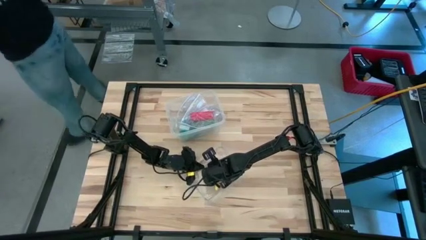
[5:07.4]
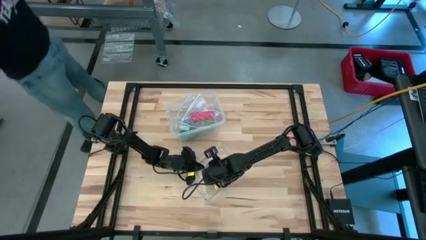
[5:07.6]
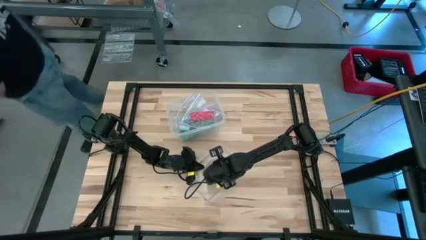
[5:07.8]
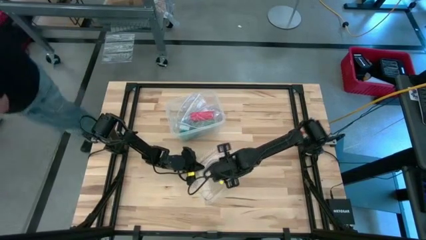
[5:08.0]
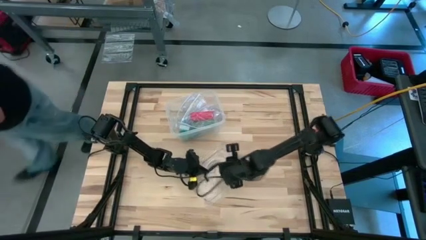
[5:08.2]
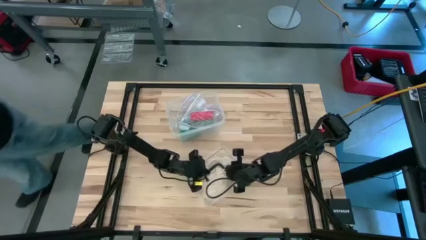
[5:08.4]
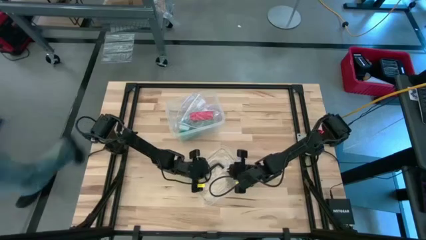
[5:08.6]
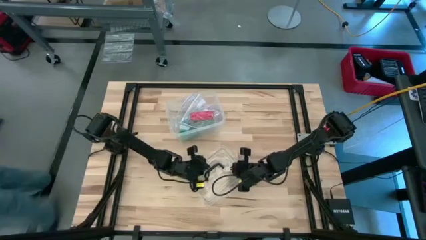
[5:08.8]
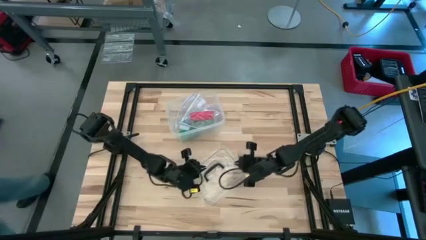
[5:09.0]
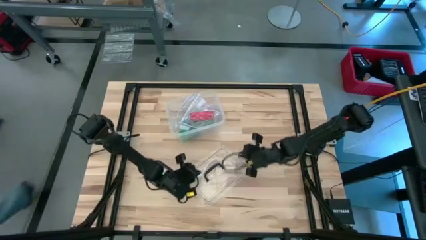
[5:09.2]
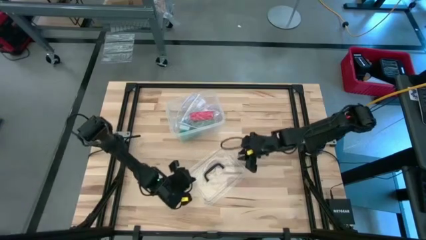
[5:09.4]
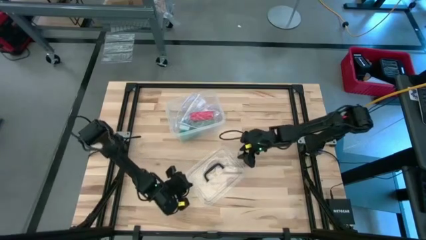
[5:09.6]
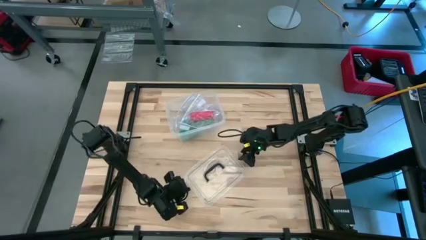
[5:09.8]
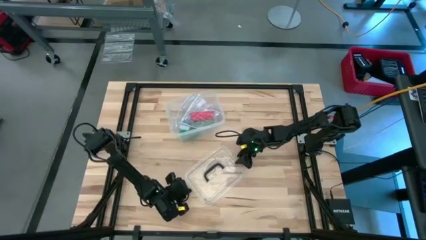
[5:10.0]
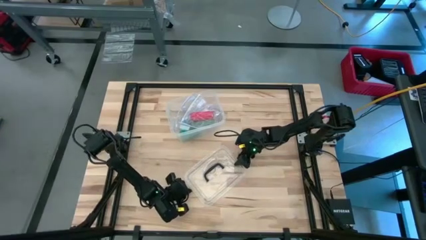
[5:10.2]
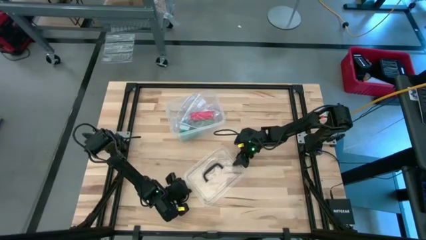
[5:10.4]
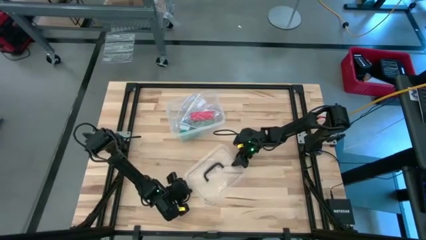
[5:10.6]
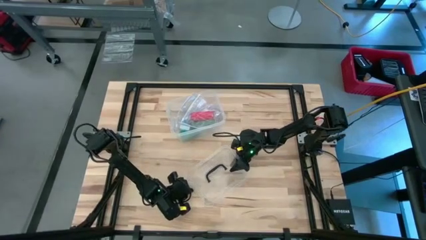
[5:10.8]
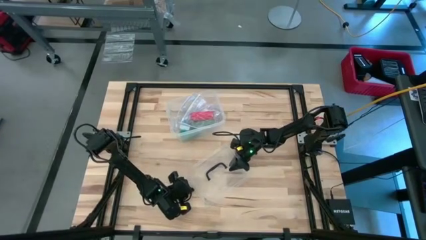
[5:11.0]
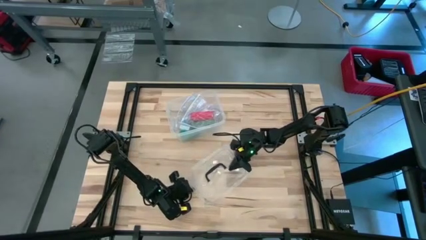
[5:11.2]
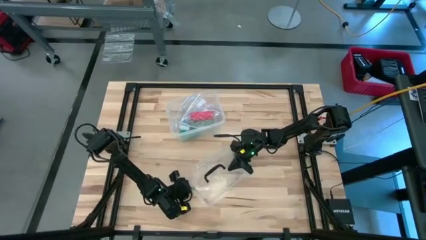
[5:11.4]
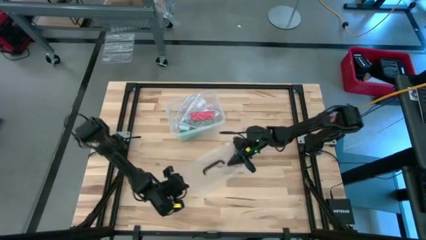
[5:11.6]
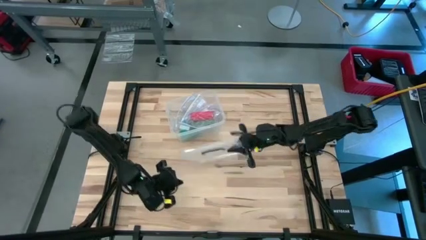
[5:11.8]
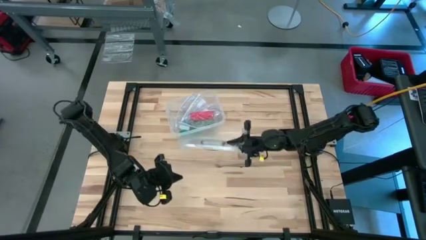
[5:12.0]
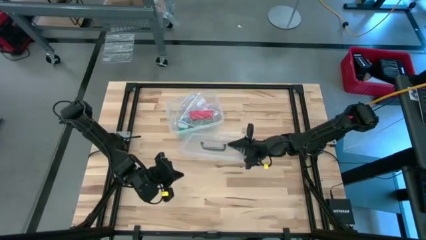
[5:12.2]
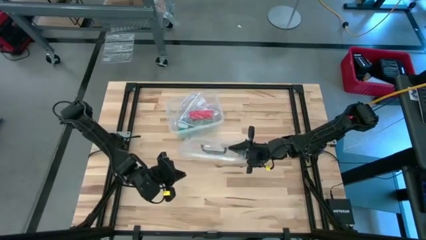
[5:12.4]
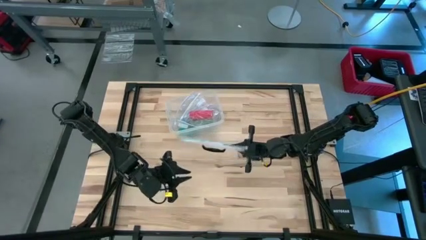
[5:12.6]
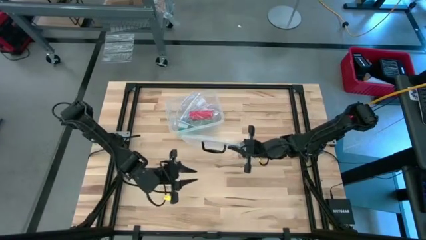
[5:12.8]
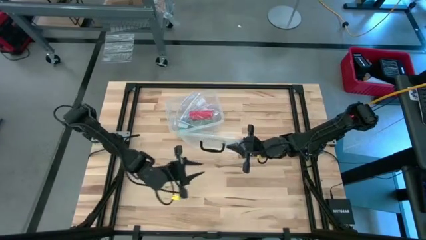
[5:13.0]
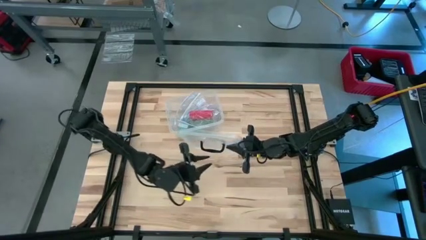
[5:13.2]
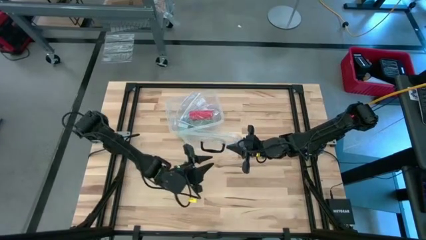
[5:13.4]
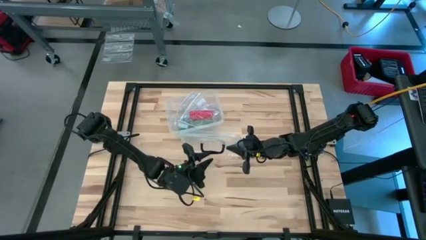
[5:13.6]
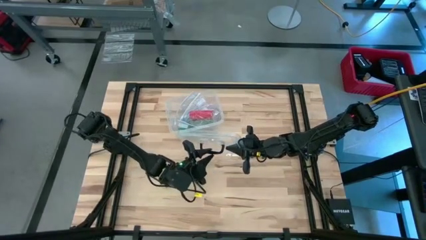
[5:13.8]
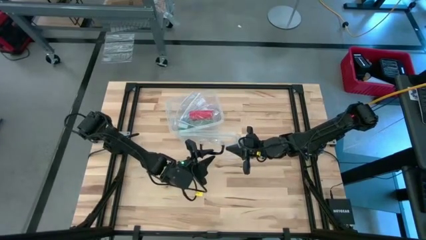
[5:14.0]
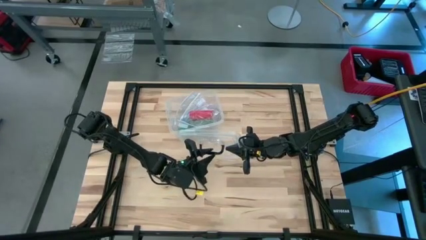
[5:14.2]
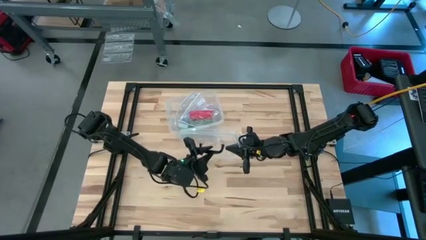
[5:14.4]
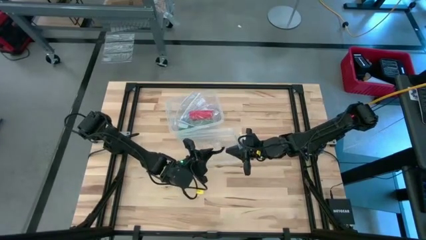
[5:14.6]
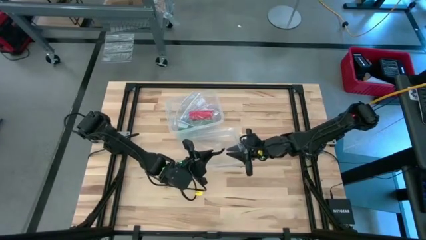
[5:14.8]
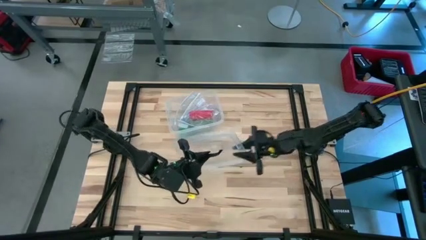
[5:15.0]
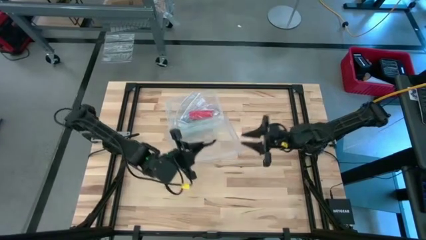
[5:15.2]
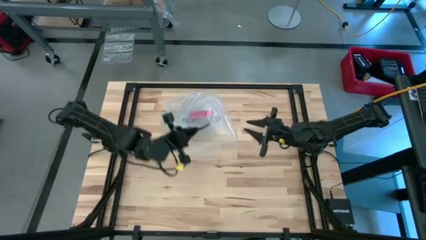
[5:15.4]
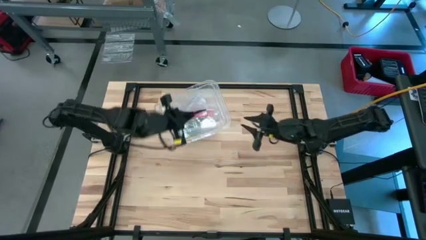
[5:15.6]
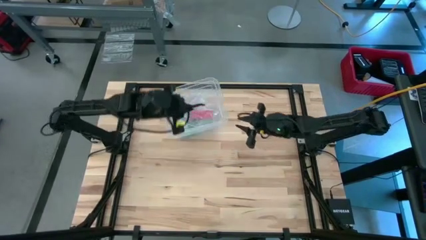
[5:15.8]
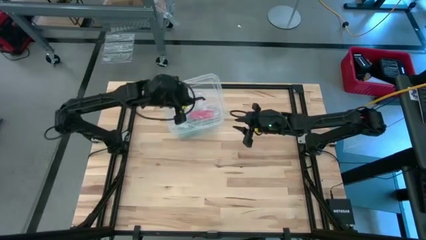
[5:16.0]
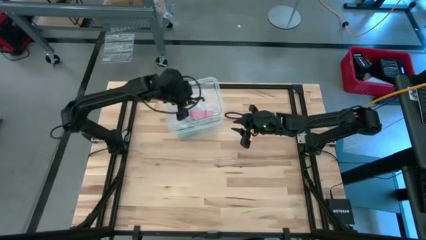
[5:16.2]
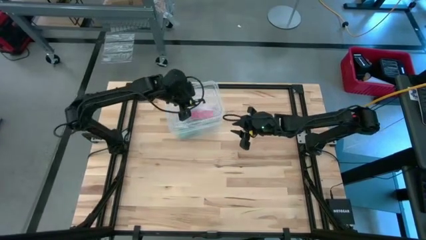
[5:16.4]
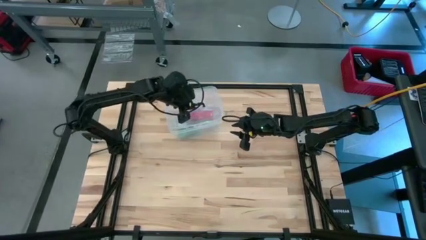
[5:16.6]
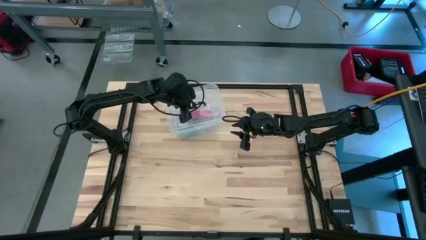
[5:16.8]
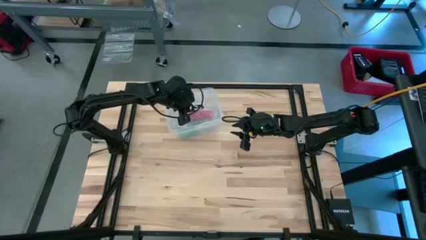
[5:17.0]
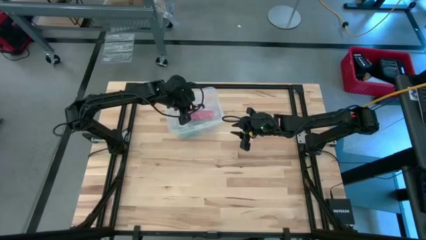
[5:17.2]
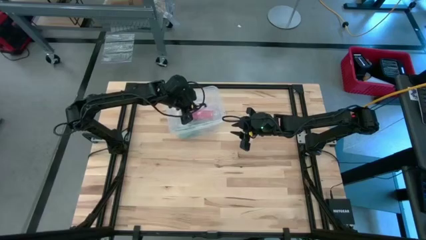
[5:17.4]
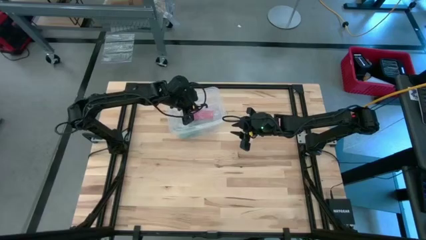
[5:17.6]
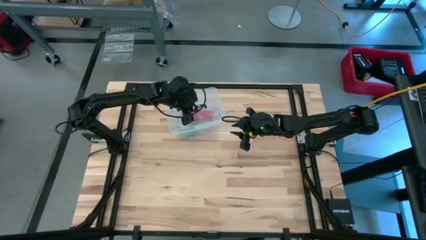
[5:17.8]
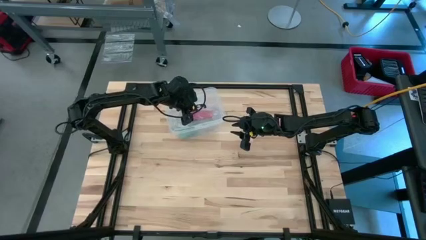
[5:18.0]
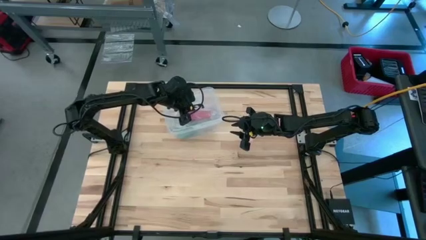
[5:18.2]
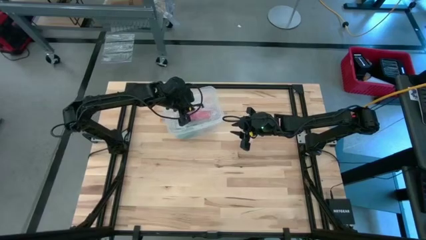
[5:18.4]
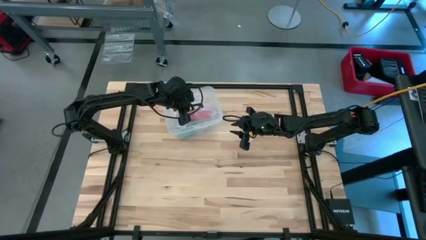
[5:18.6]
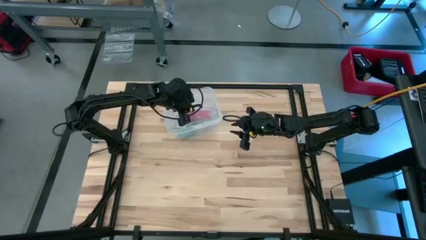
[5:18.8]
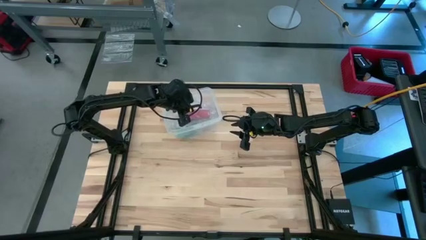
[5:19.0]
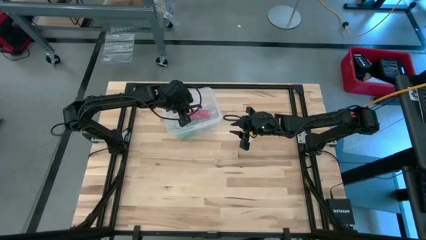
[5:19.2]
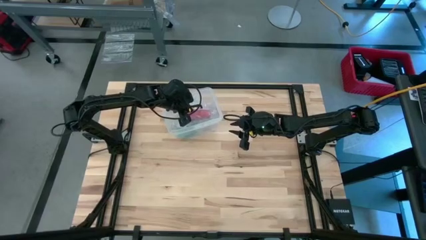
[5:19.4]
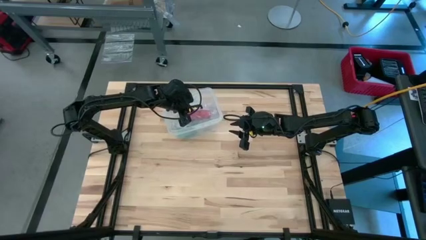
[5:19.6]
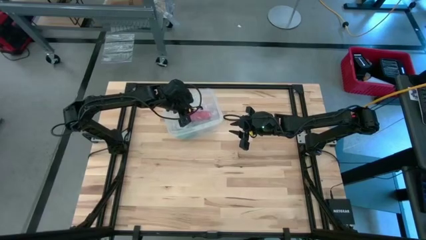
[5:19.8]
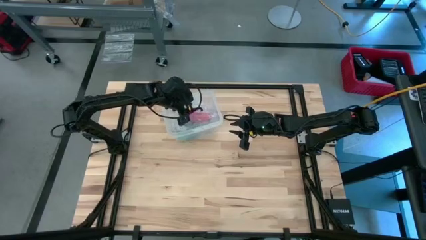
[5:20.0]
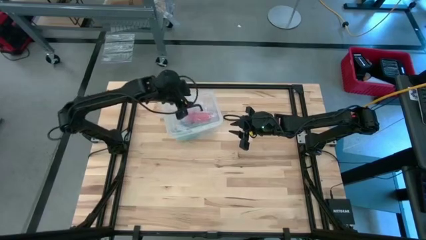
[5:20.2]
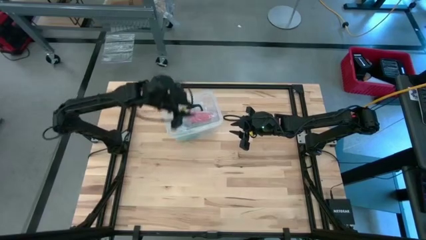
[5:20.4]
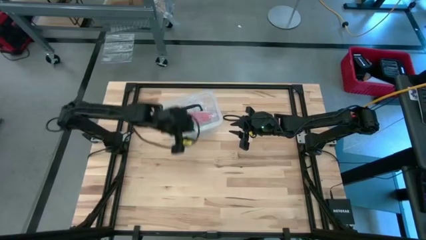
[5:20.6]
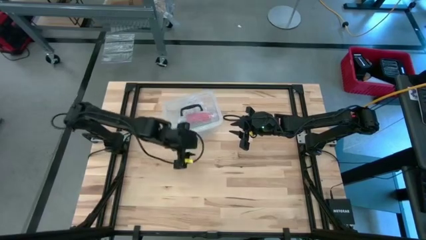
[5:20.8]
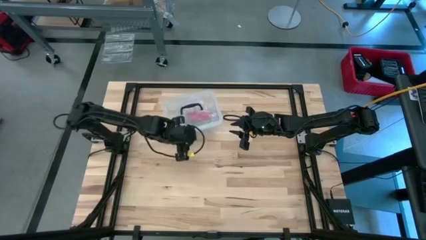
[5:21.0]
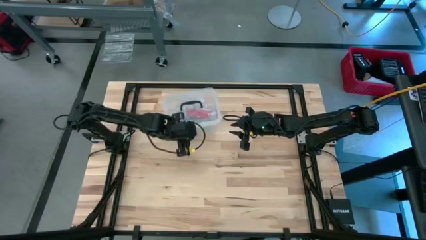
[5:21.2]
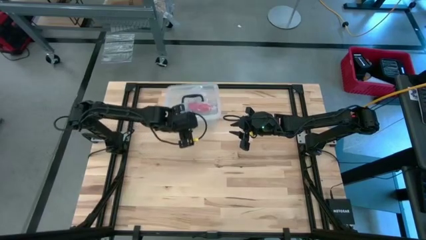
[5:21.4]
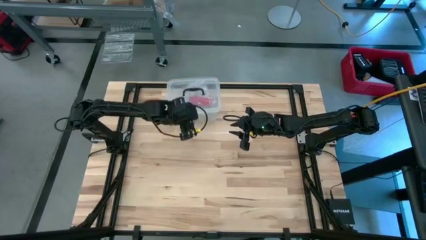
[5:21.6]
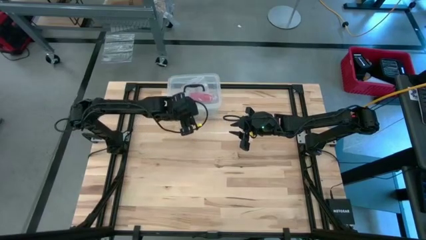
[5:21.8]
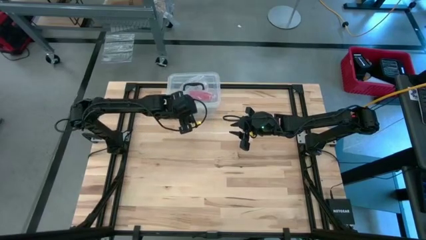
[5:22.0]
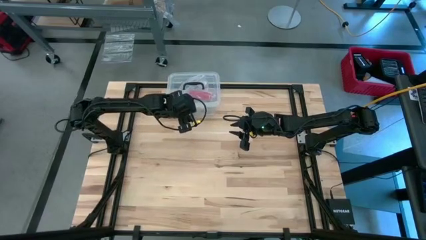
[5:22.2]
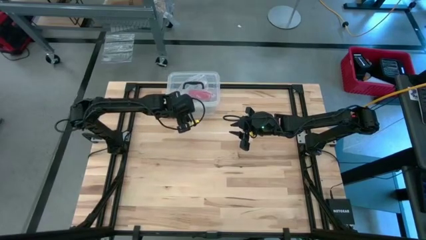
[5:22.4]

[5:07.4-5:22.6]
Task: Roll bandage
Close the transparent container

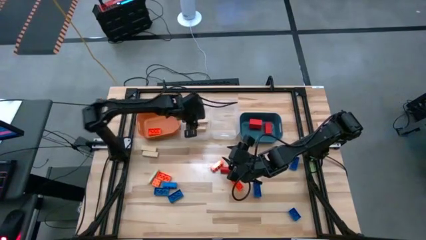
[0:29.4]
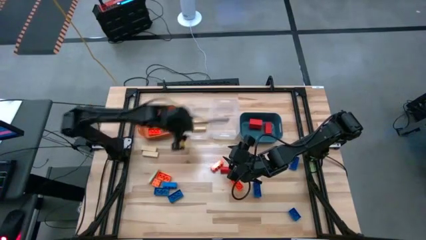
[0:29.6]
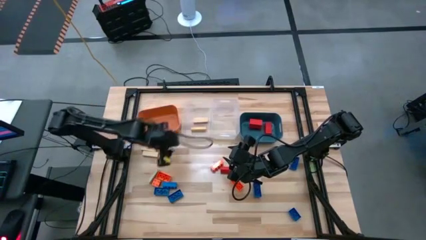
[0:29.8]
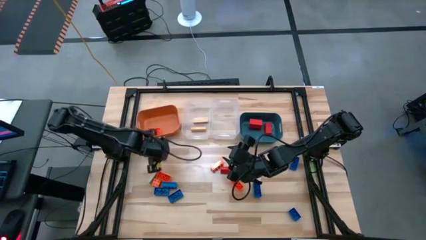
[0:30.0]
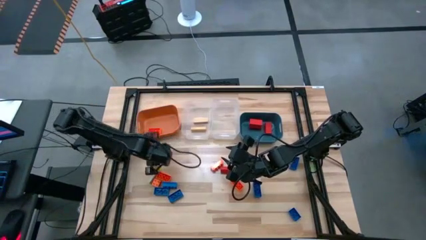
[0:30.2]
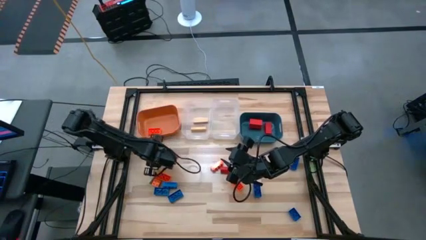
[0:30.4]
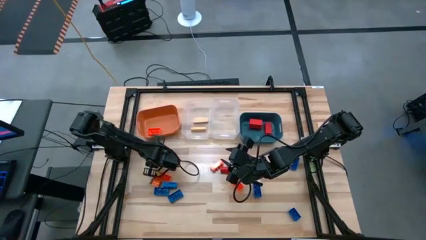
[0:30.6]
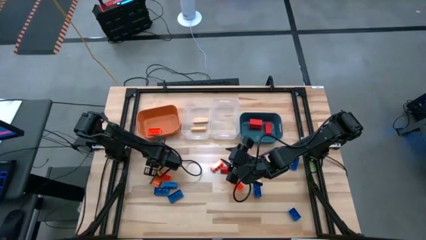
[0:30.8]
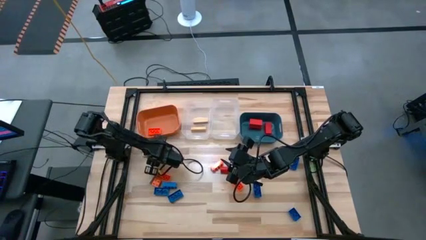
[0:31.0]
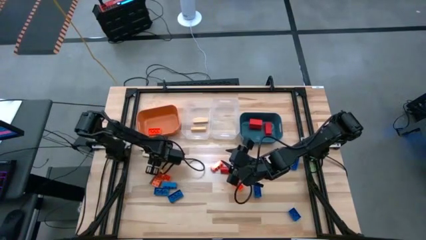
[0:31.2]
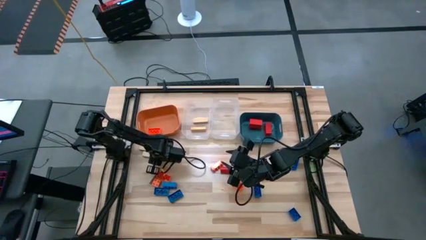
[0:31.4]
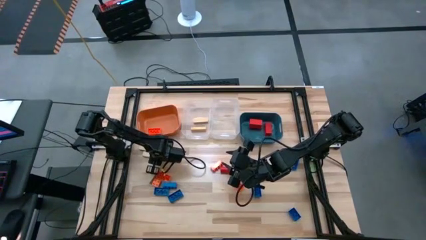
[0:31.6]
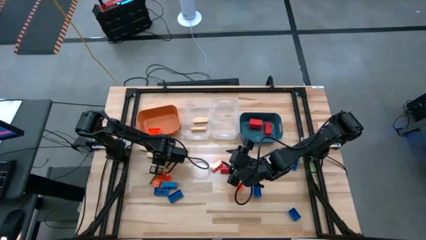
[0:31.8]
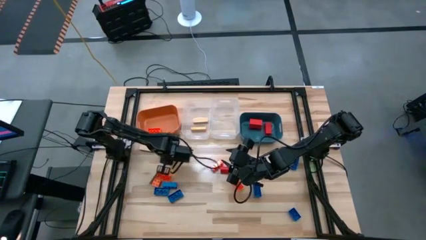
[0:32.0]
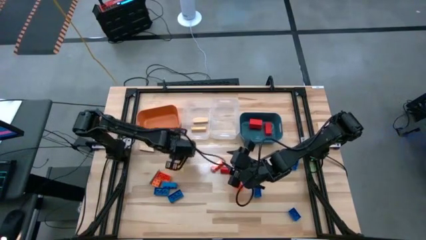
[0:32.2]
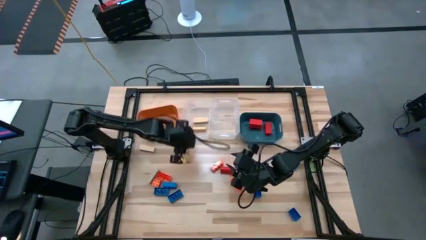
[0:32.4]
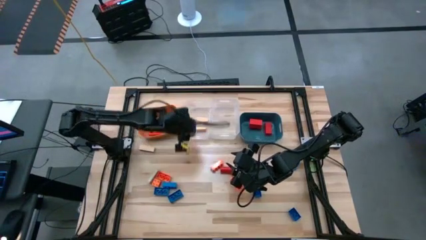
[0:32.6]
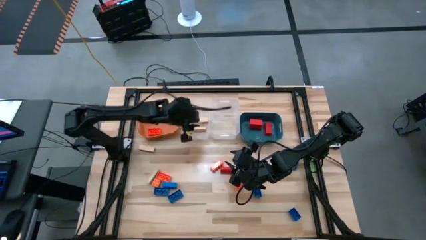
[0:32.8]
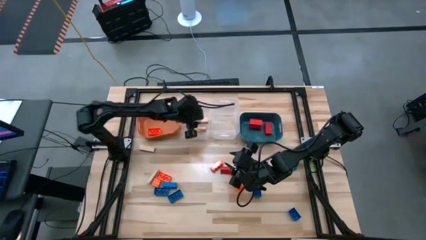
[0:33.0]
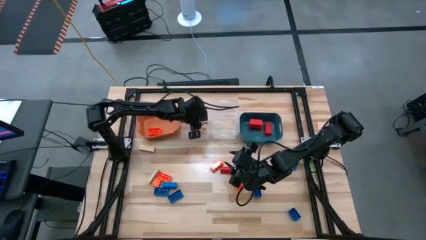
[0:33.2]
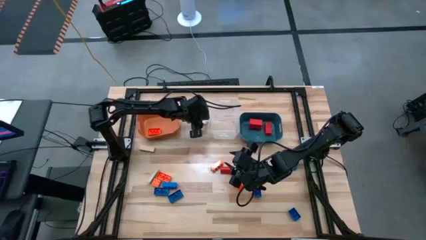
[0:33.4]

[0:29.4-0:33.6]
Task: Sort blocks
Put the brown block into the left transparent bin
